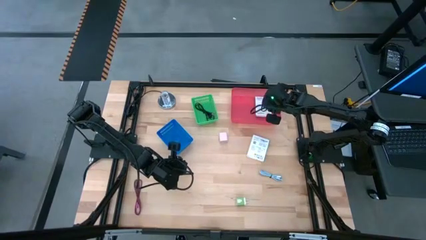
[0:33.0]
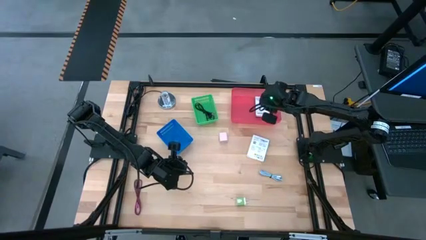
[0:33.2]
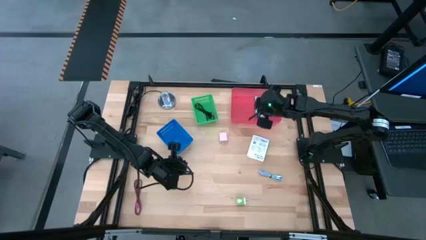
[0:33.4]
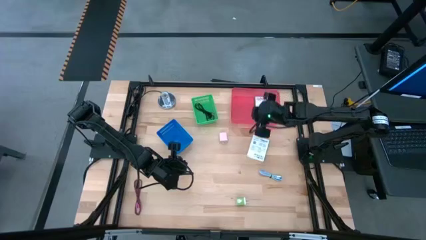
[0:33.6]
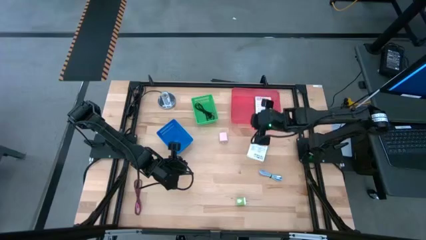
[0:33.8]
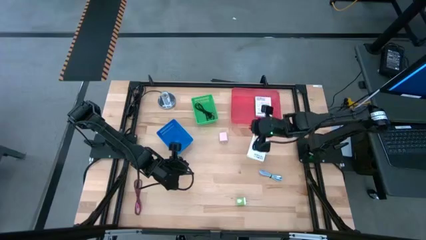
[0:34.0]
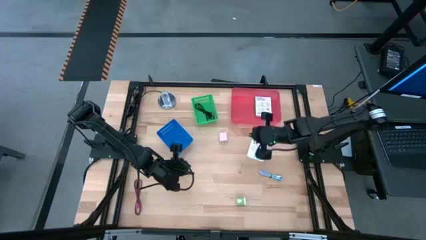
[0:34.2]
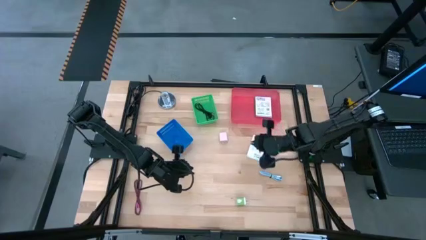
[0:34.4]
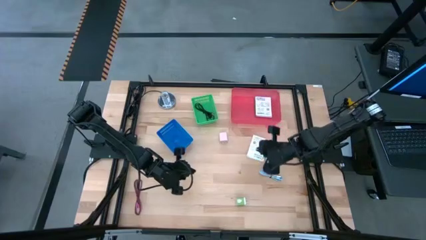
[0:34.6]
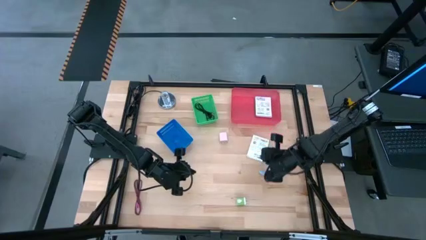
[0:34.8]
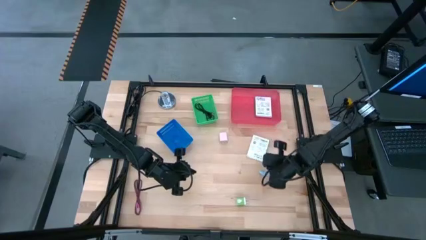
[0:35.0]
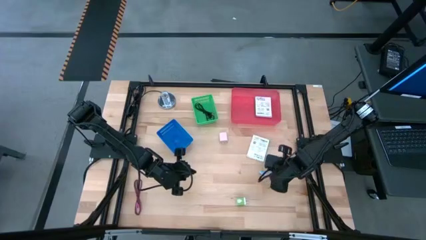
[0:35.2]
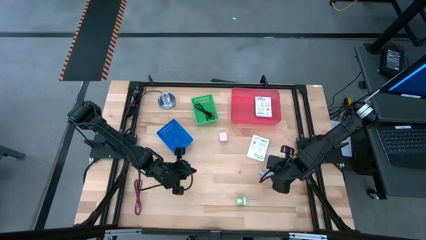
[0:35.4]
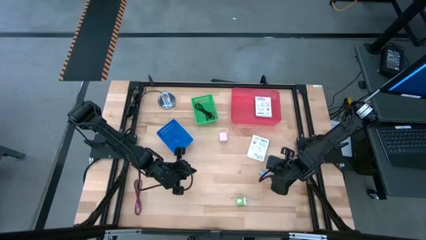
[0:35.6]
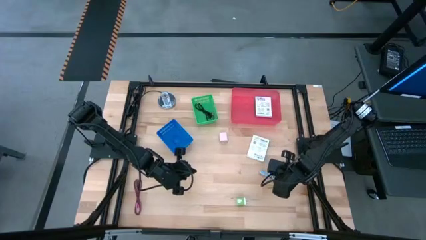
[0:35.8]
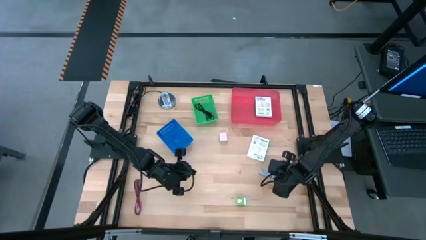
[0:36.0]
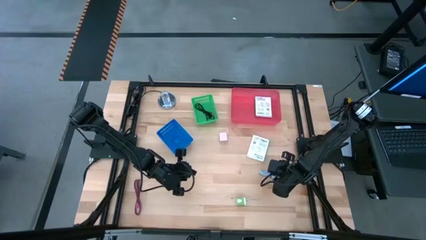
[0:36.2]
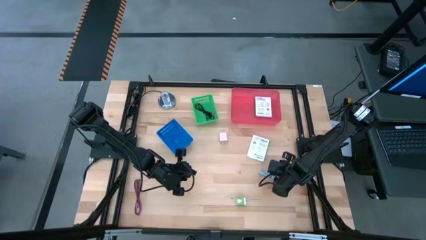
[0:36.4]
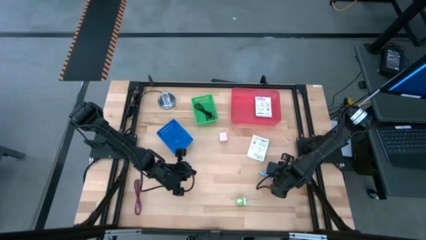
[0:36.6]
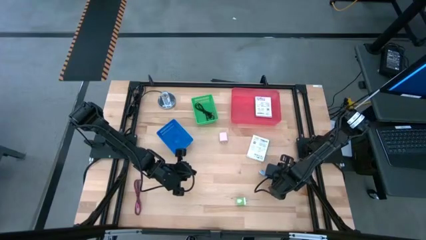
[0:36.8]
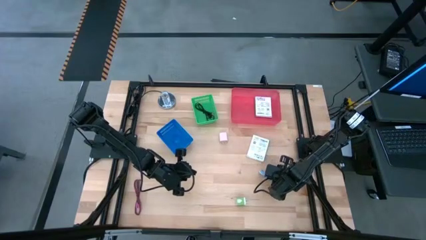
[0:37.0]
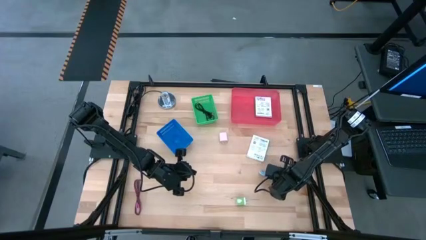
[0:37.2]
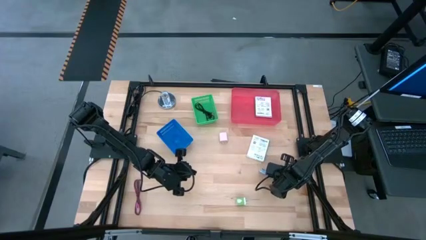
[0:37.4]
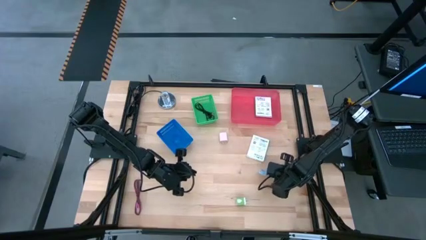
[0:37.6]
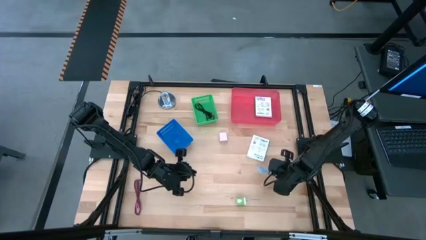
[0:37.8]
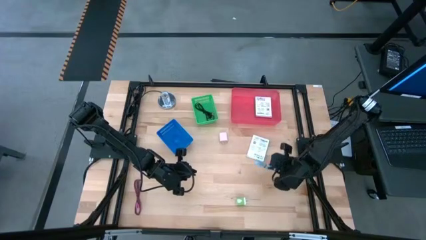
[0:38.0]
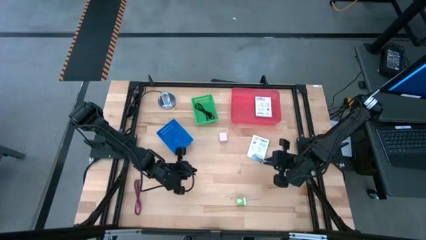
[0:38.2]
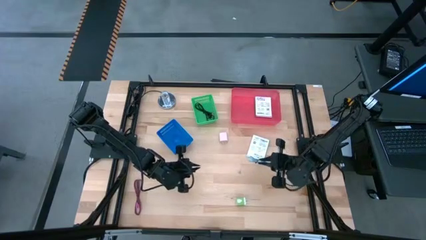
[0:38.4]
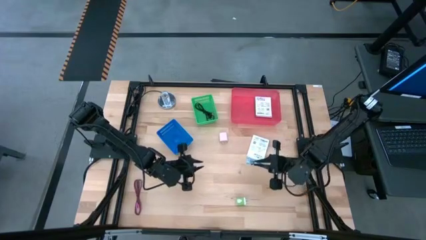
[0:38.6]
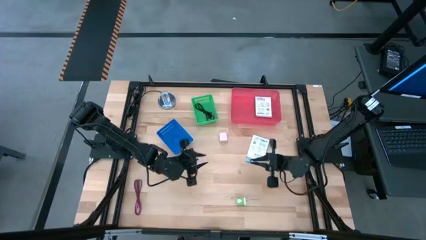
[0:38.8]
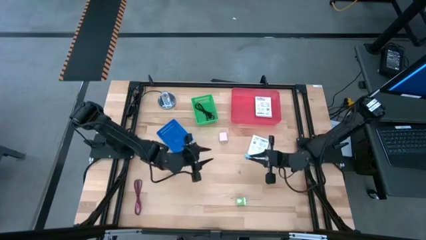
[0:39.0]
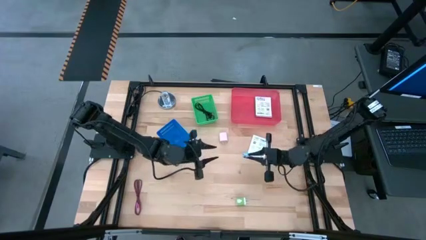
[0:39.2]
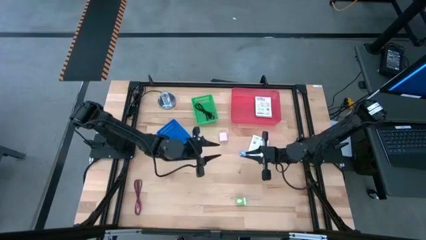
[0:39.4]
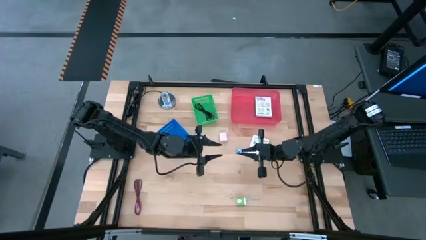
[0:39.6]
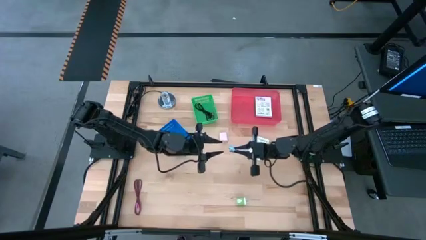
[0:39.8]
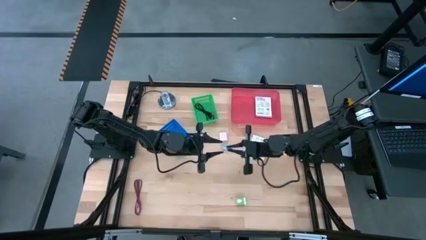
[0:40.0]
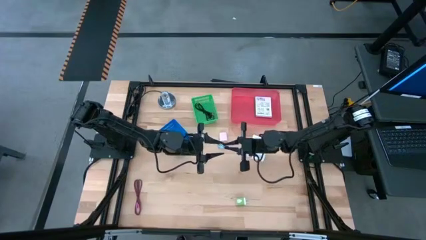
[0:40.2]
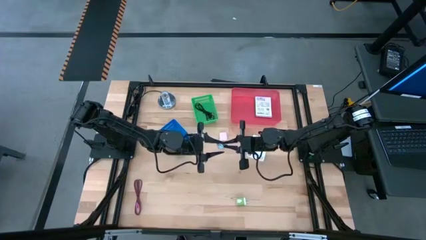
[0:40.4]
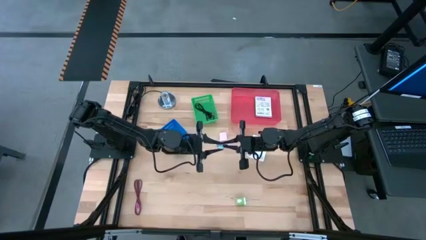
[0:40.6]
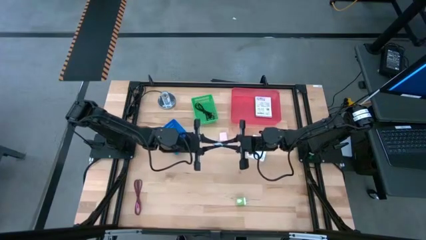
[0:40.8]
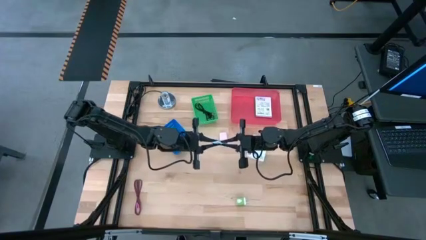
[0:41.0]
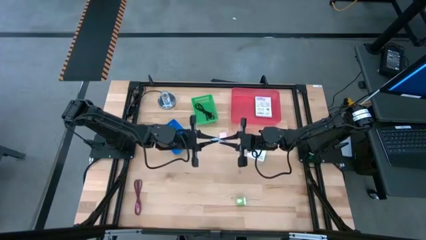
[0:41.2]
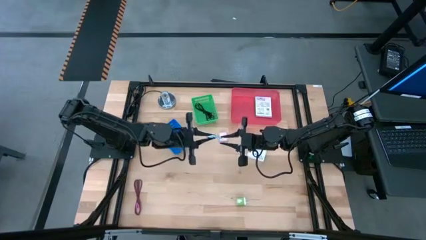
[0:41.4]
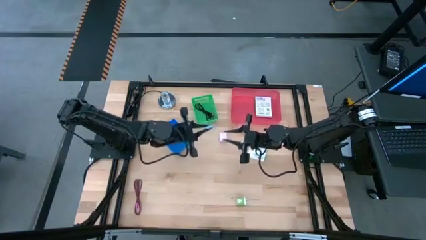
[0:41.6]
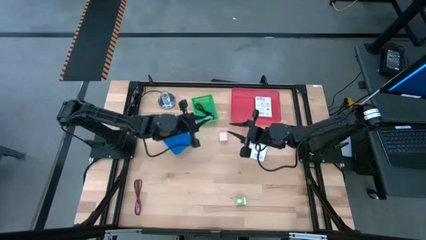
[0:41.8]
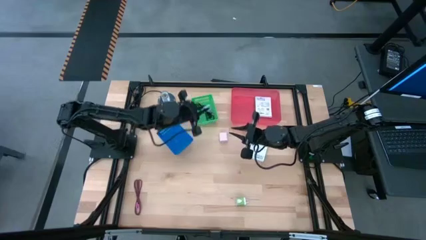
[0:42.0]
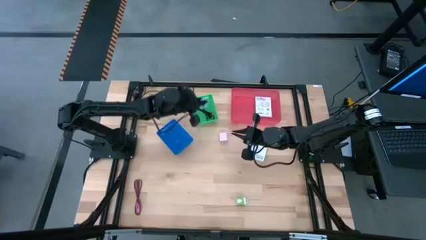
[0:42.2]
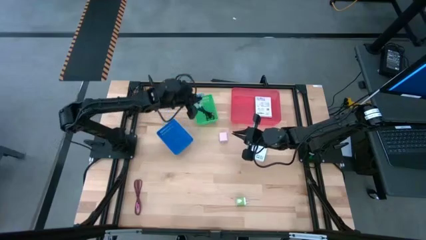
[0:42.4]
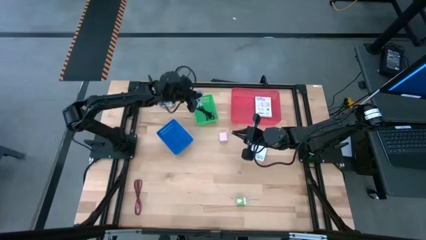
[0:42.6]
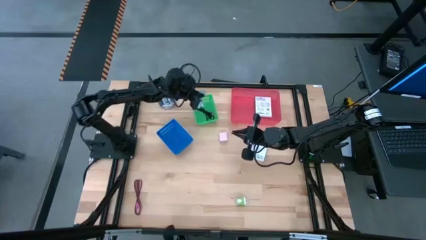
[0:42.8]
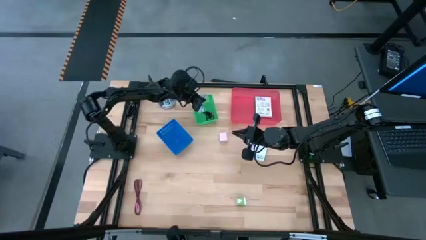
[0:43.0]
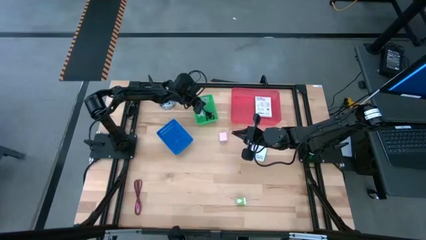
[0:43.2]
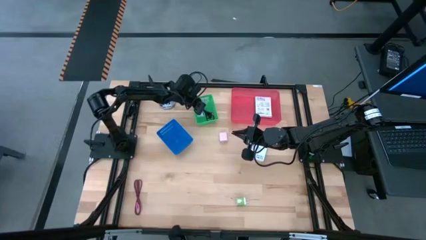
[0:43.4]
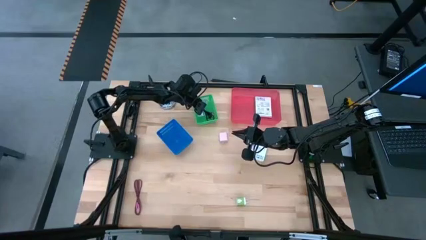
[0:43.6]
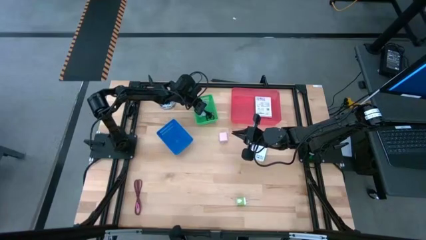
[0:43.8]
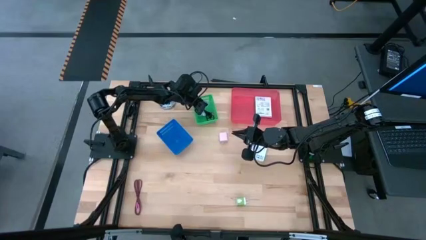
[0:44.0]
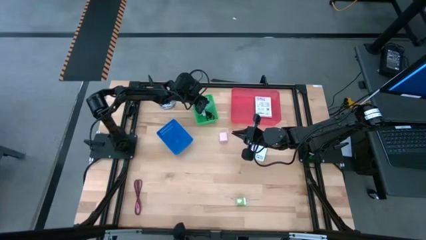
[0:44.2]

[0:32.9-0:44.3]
Task: Pick and place items into bin
Put the blue charger cable into the green bin

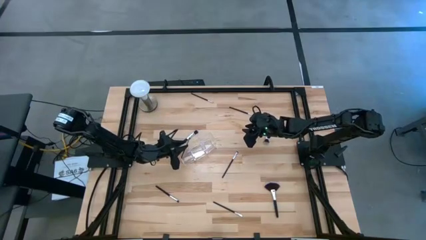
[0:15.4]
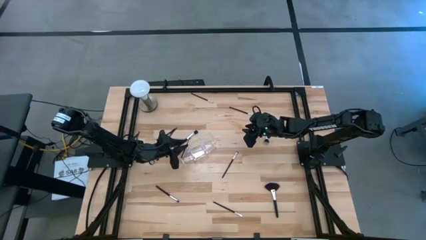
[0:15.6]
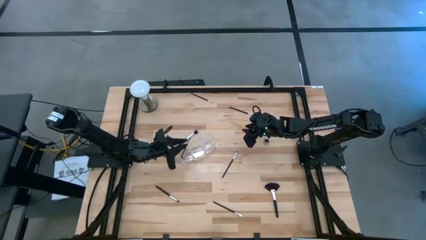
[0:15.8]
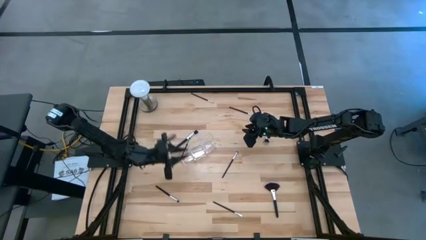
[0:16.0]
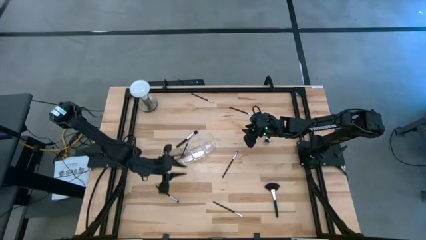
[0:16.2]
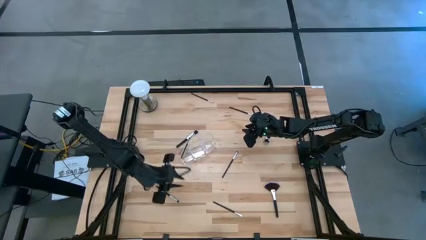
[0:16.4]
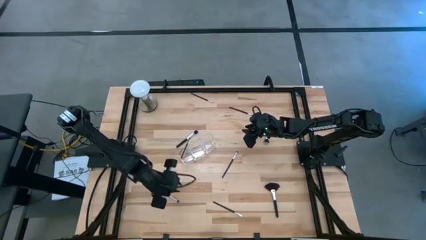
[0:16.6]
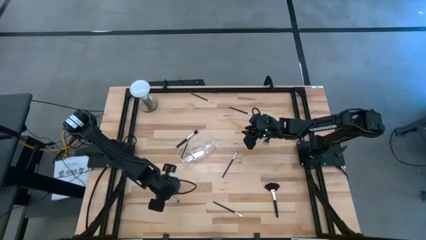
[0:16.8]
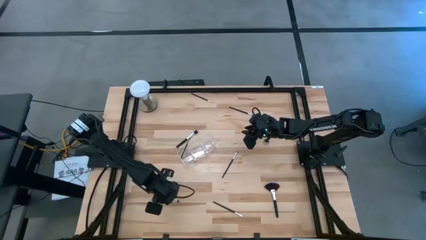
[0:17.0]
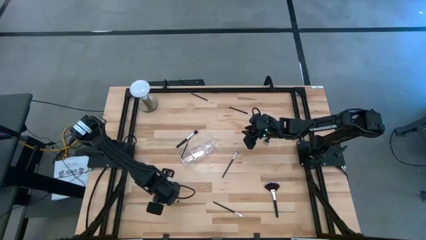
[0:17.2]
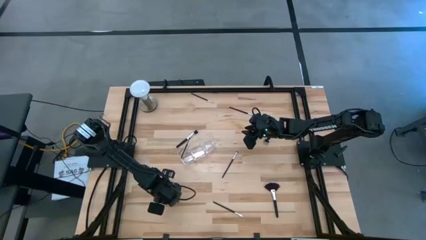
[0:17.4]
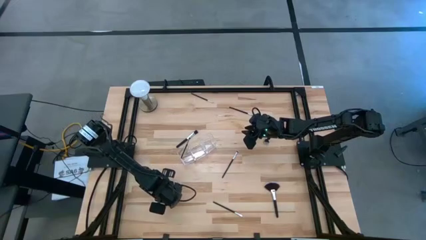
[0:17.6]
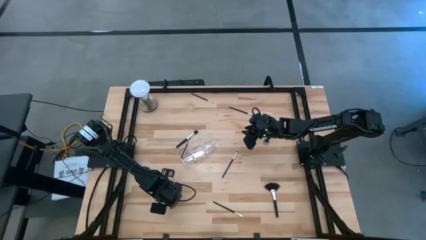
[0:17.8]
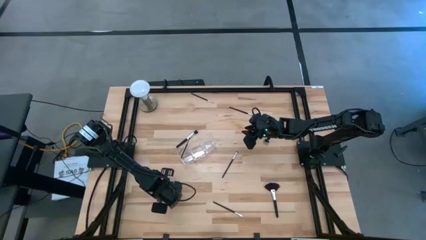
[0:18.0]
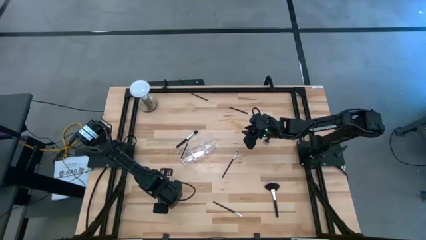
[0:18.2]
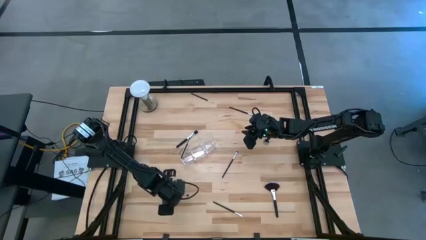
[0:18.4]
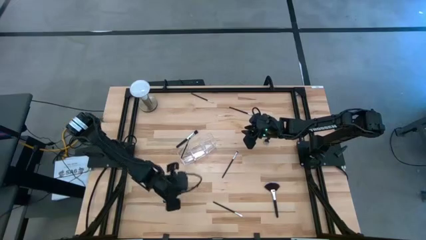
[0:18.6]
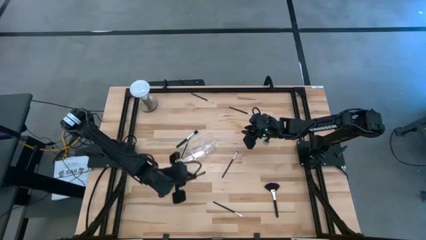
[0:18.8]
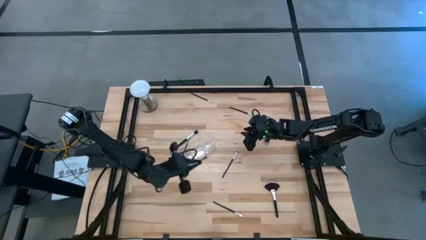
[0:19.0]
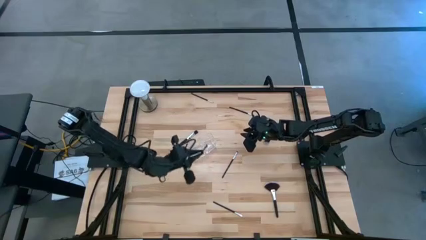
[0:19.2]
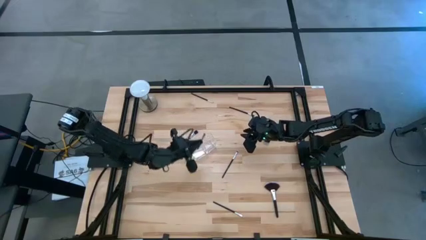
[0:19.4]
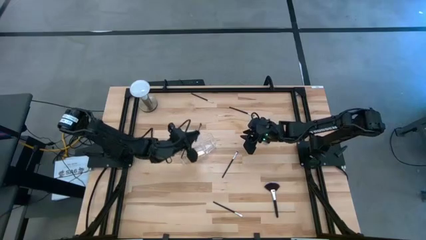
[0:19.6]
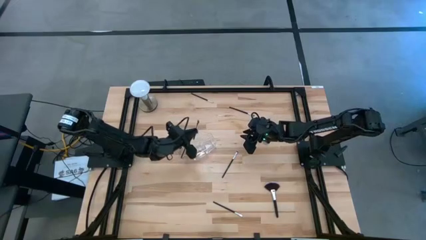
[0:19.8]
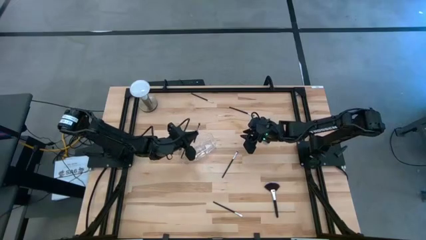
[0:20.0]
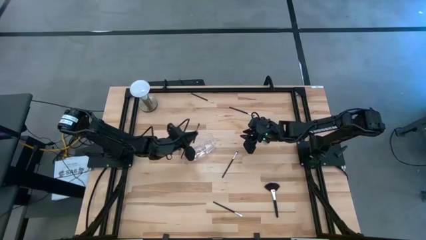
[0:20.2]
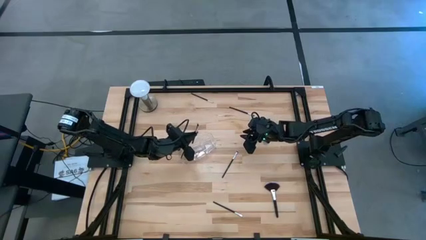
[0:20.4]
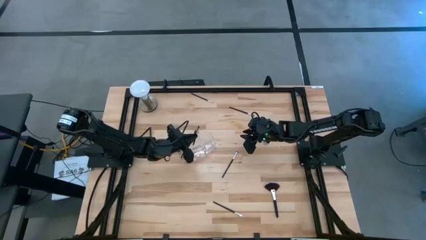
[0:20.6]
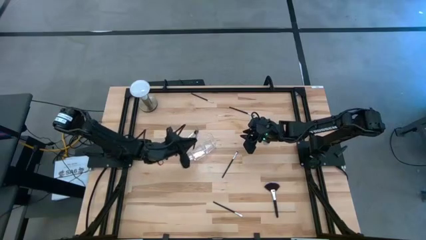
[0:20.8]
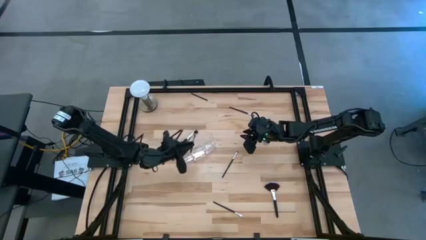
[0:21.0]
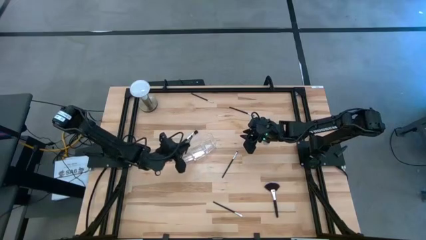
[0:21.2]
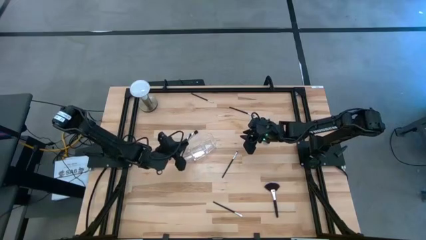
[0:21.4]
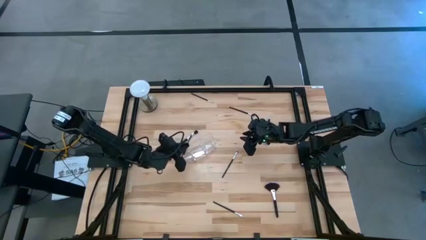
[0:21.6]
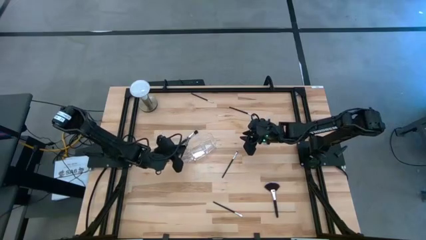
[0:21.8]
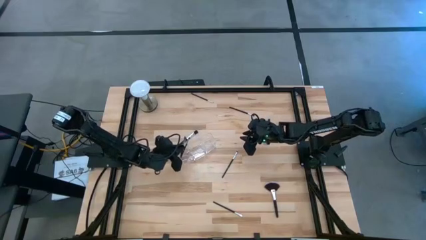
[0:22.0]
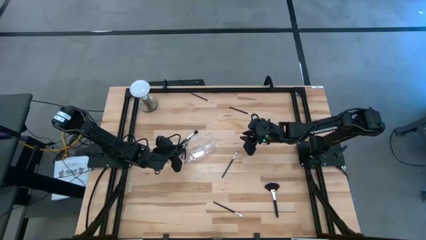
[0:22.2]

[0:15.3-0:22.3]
Task: Put items in baskets/containers
Put the foundation brush into the left section of the transparent organizer
